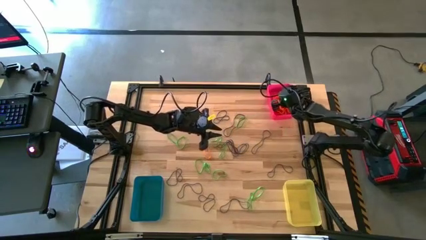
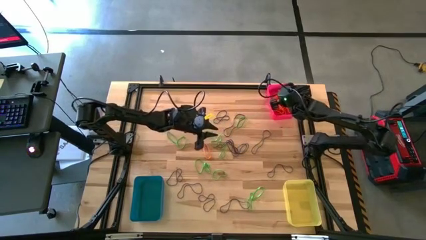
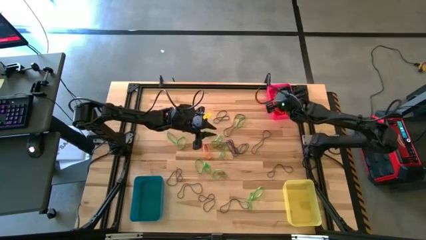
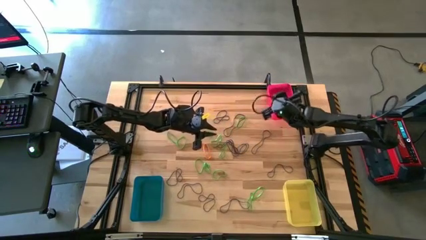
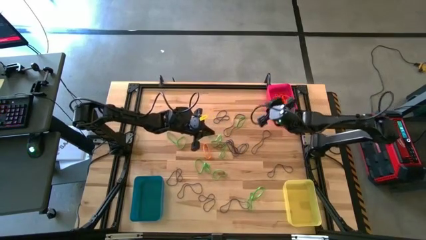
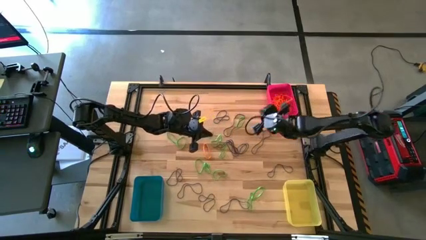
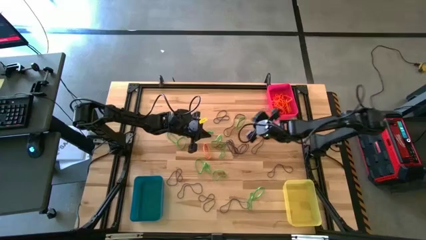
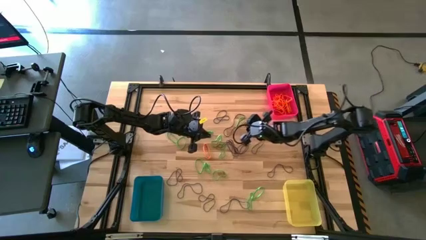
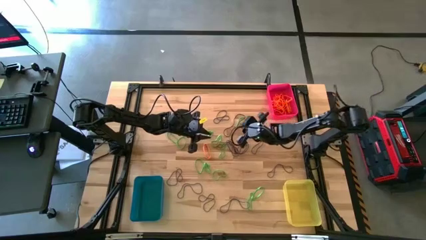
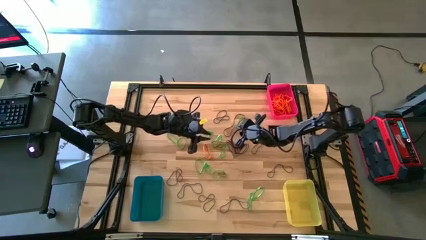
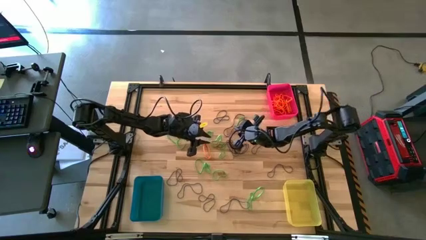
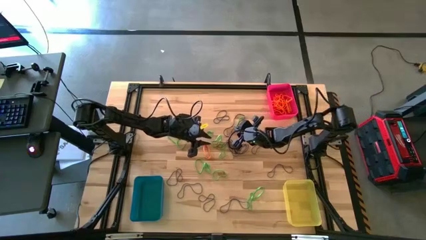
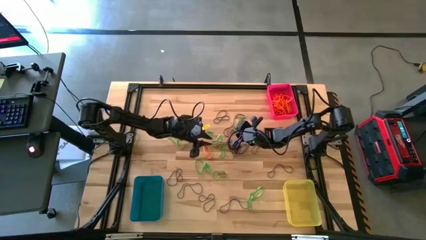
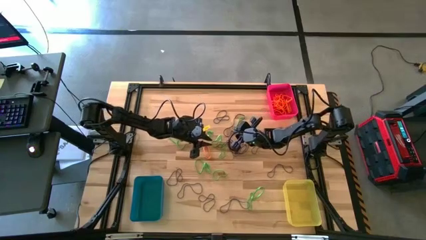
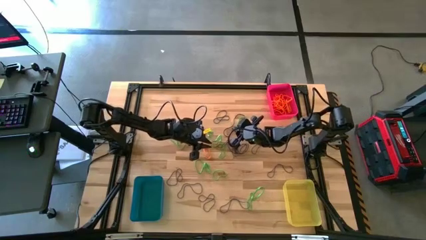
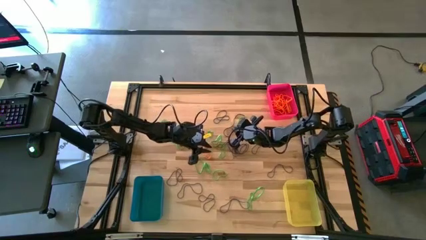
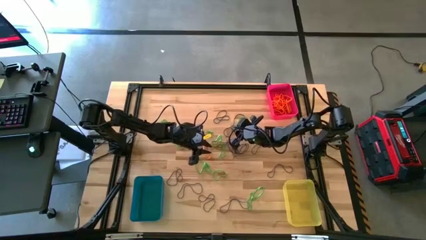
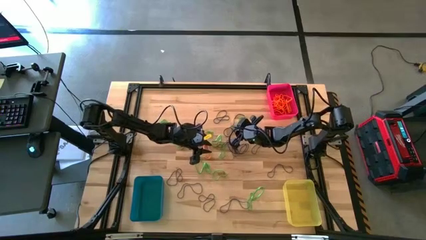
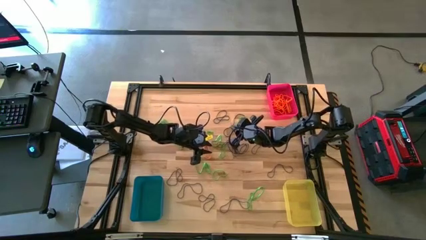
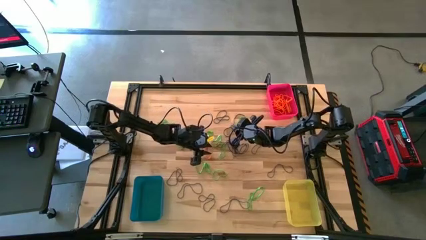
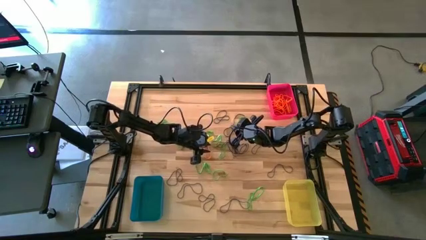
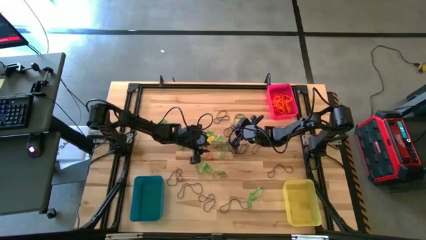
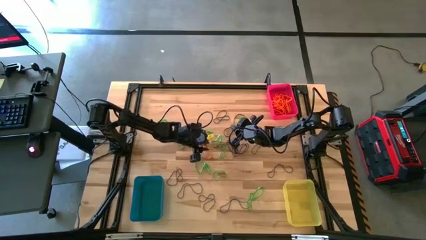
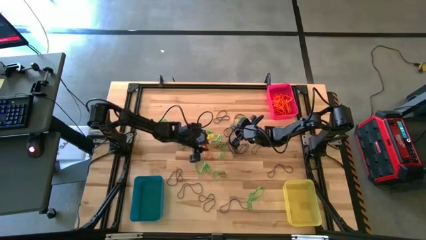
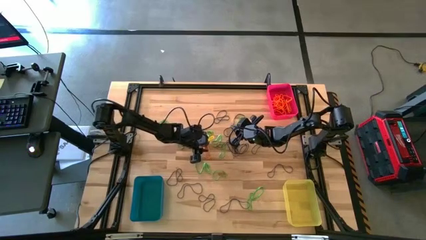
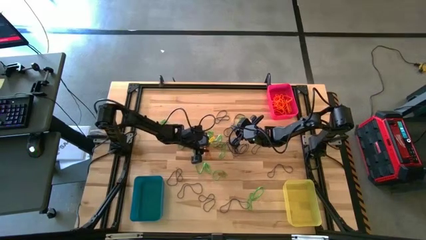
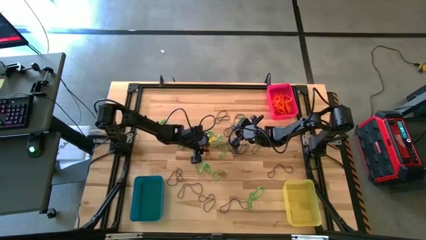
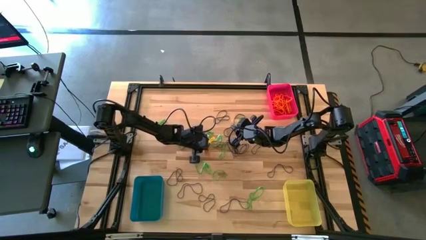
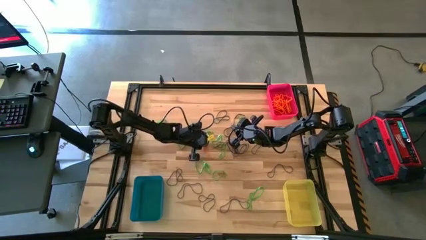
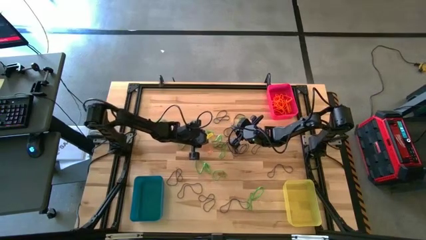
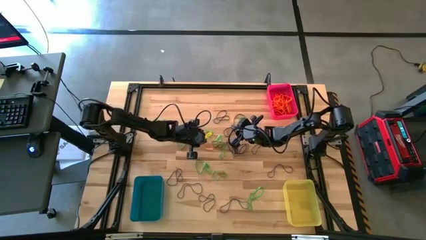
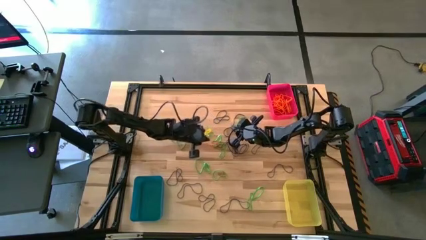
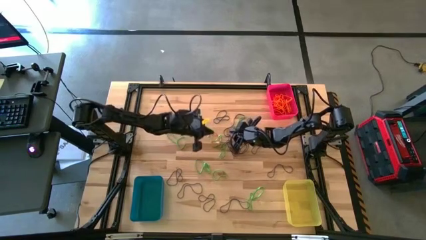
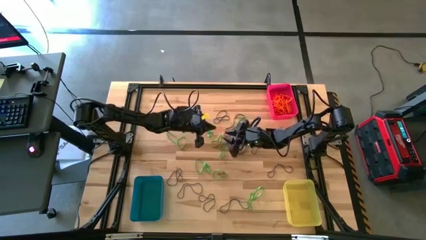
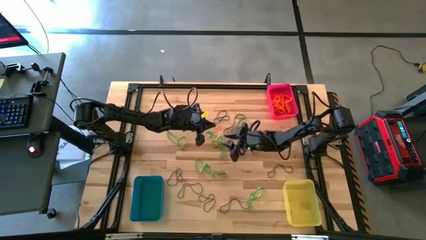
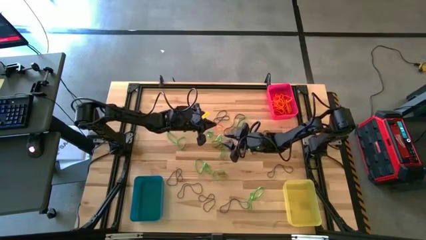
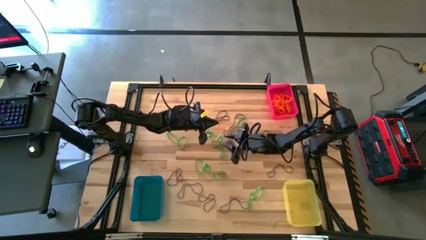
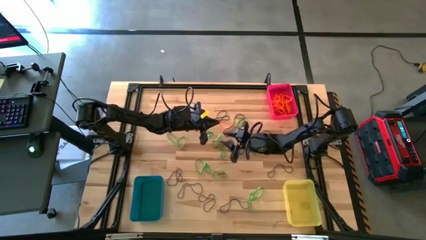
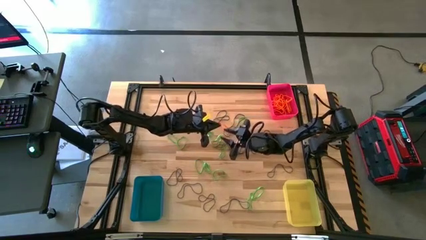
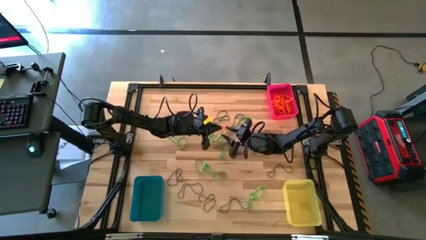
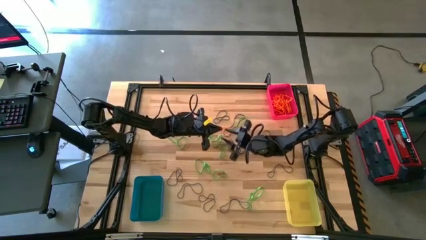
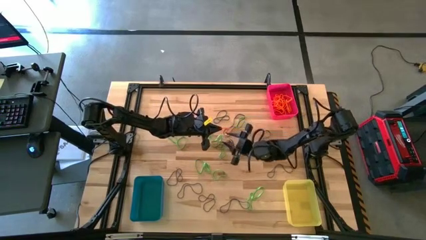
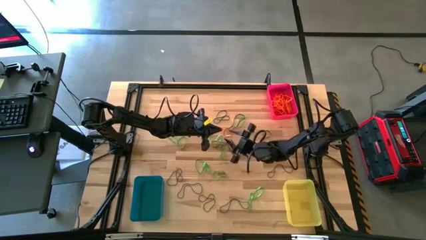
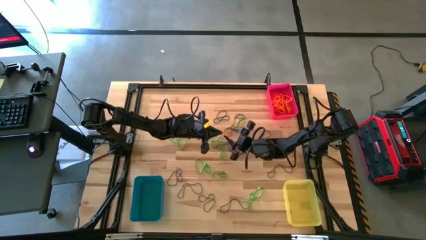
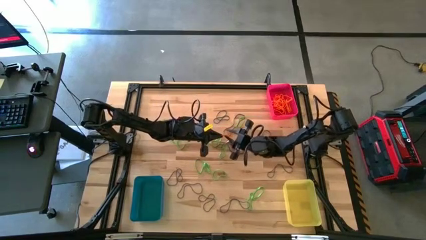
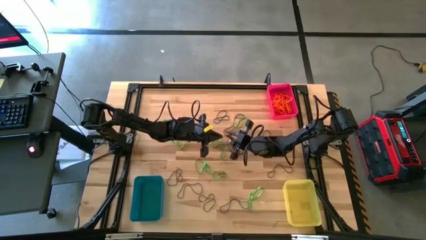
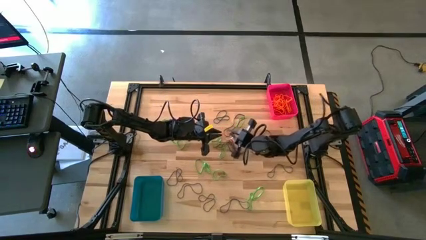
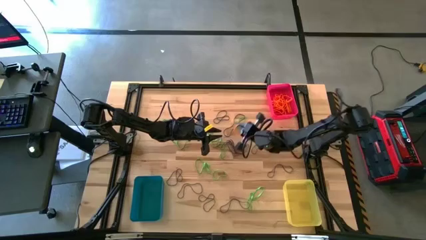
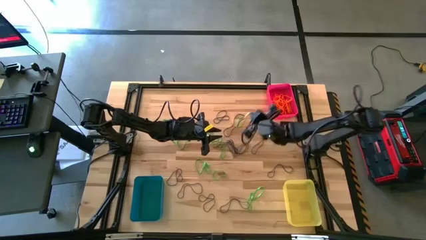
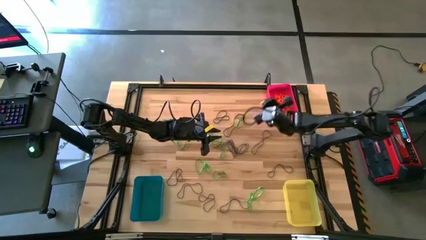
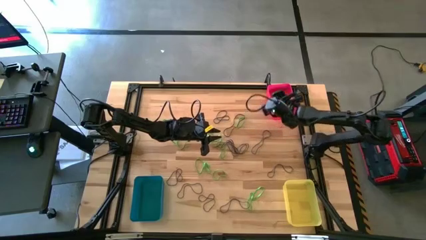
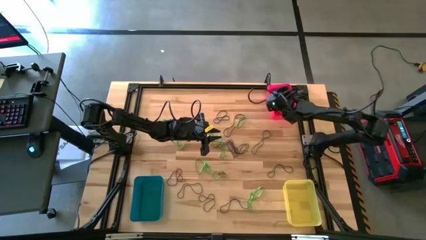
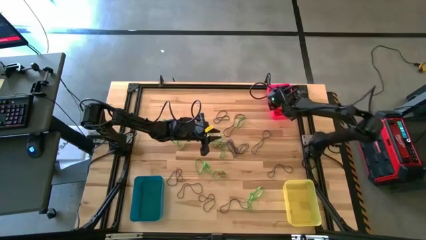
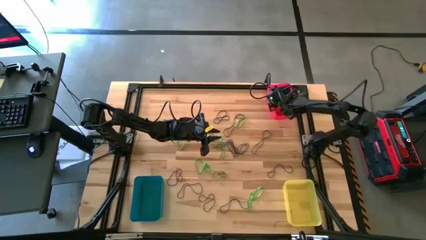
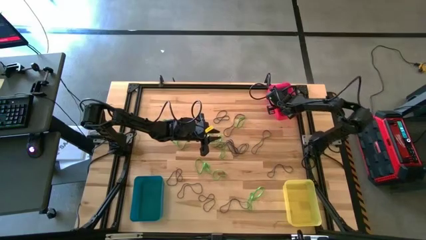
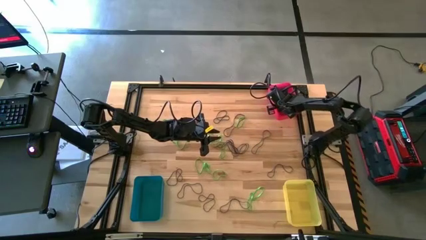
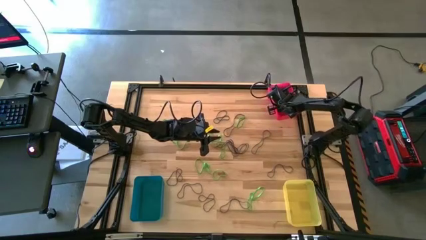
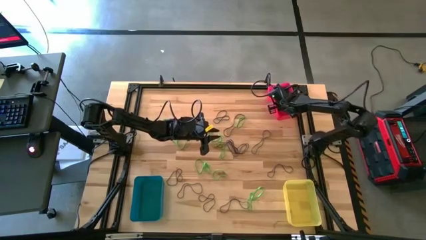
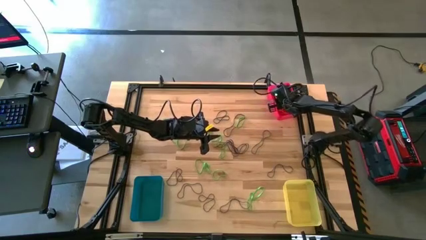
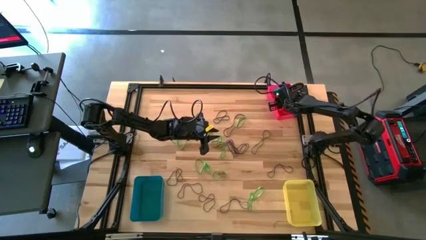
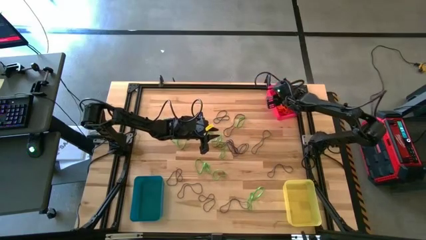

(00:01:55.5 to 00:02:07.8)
Task: Sort rubber bands into baskets
Put the orange rubber band into the red bin

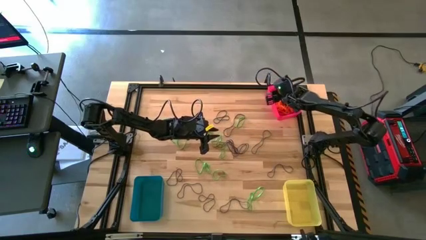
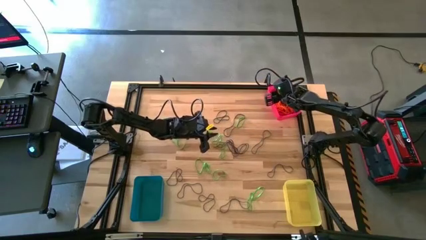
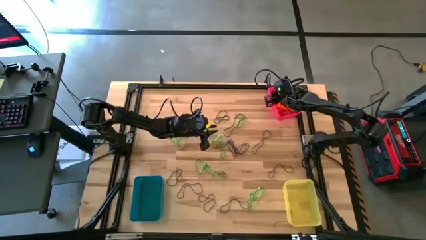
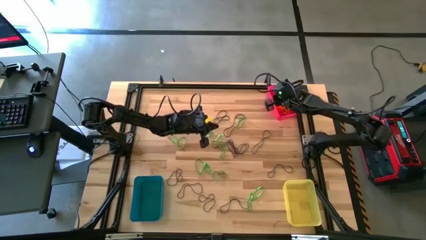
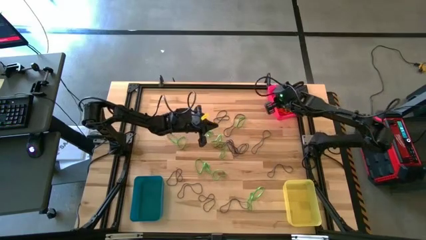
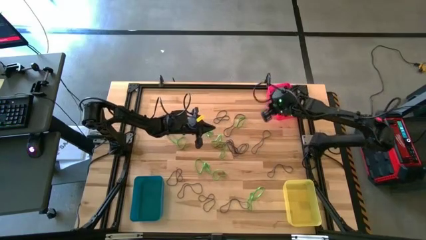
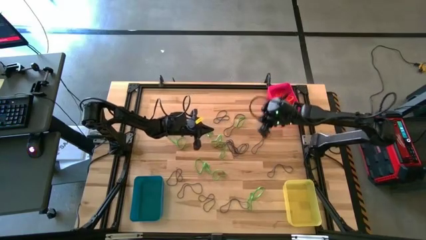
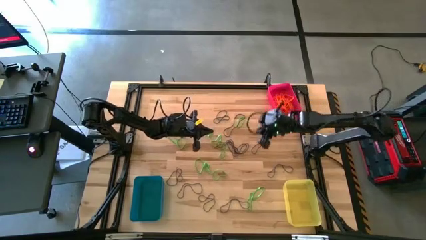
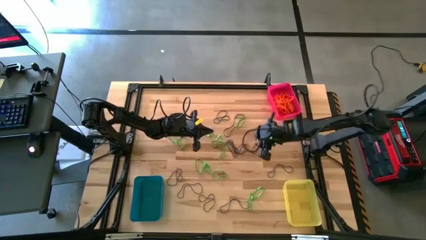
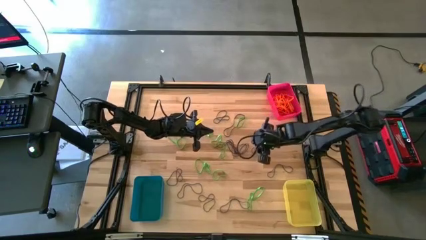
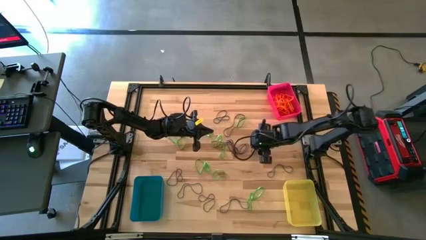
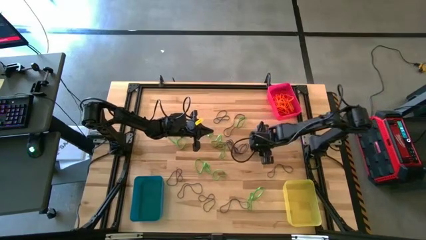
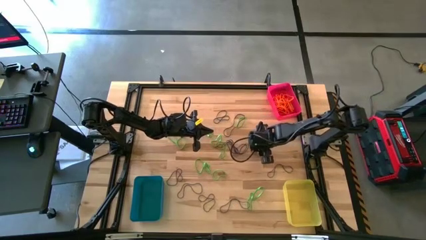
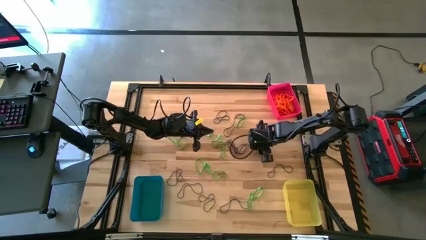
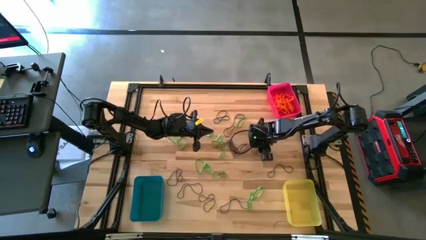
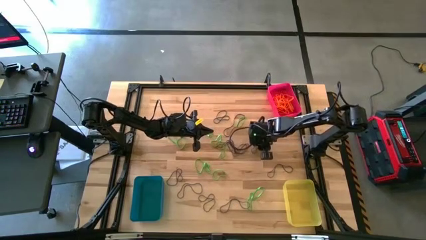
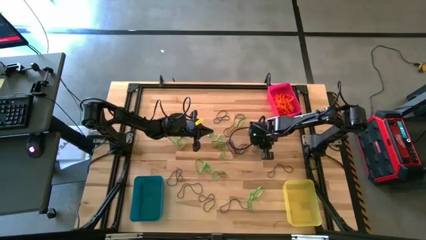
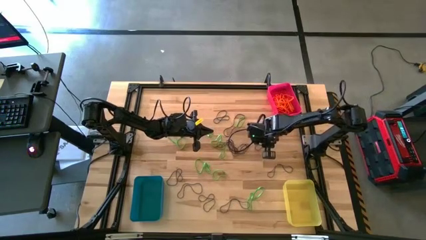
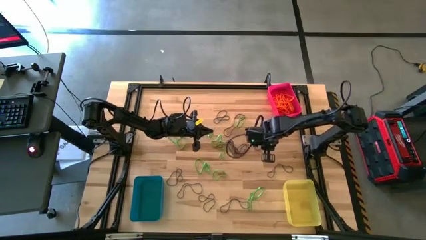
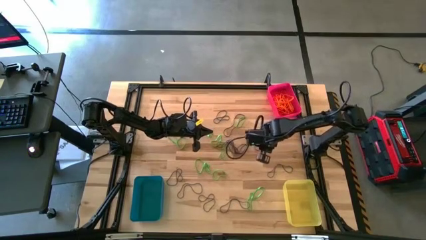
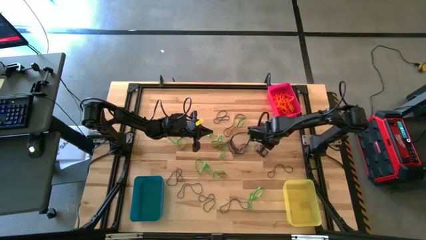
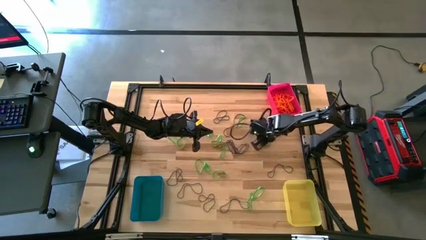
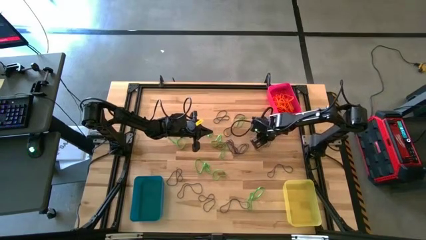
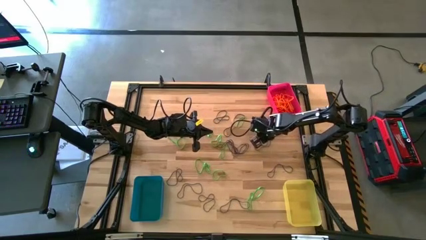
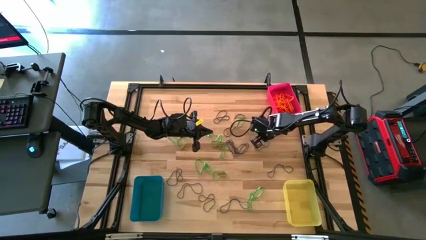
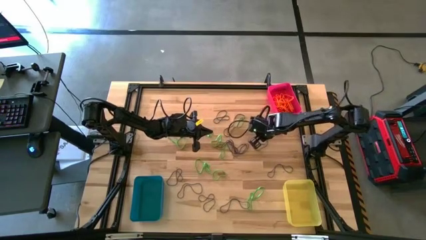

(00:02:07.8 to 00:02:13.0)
Put the purple rubber band into the yellow bin
